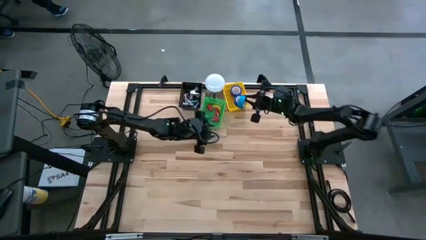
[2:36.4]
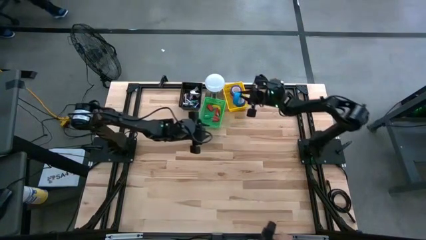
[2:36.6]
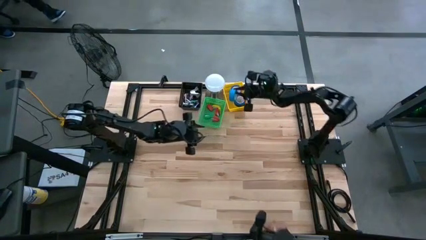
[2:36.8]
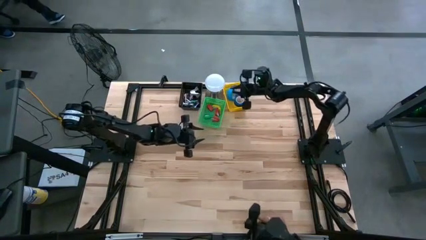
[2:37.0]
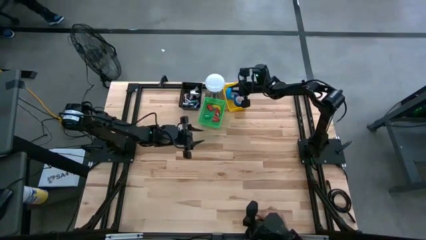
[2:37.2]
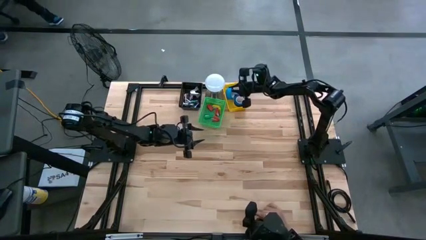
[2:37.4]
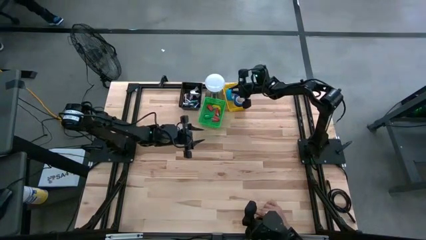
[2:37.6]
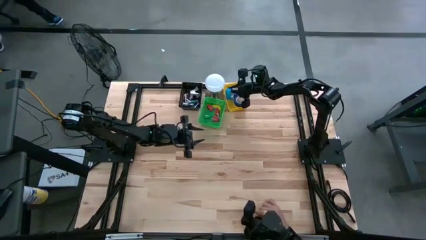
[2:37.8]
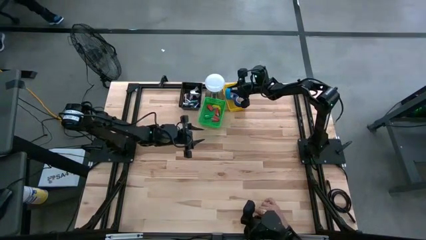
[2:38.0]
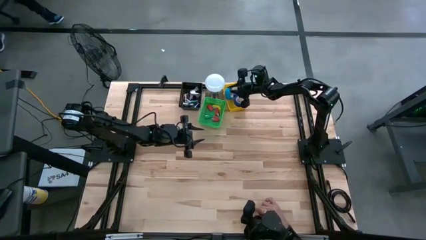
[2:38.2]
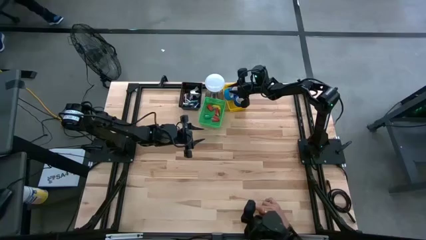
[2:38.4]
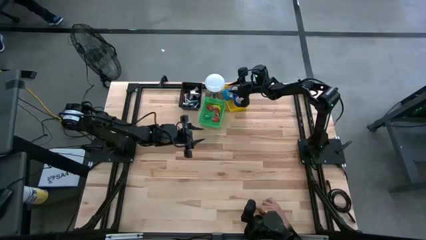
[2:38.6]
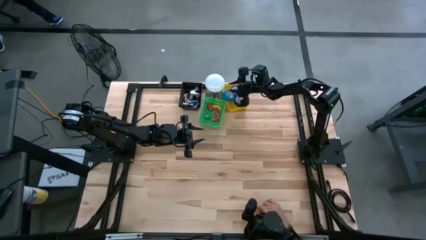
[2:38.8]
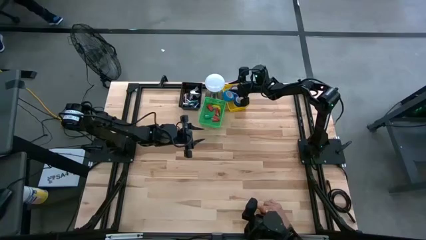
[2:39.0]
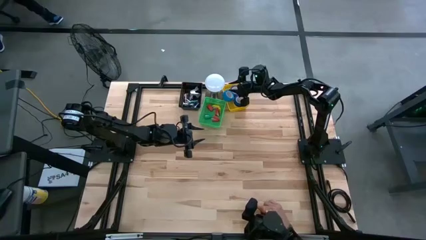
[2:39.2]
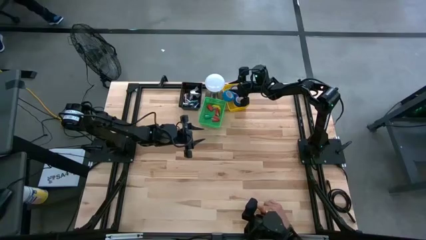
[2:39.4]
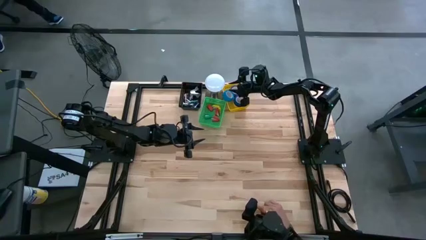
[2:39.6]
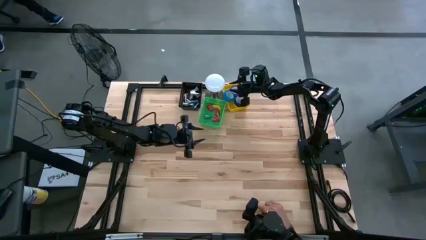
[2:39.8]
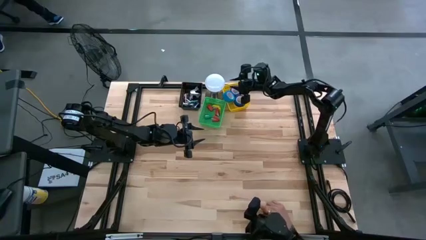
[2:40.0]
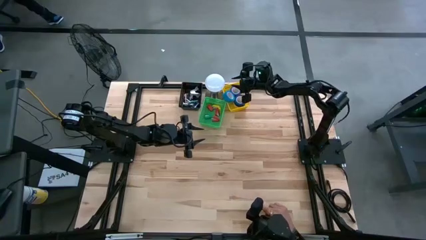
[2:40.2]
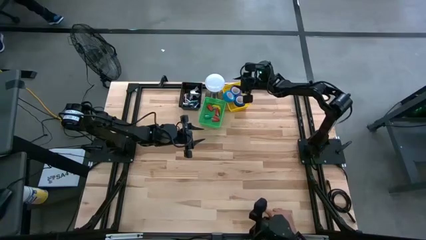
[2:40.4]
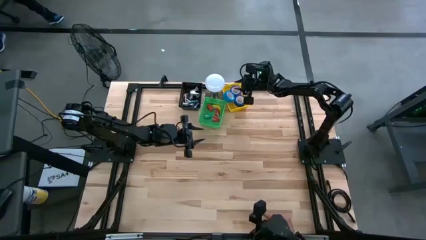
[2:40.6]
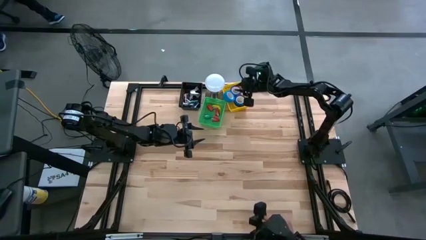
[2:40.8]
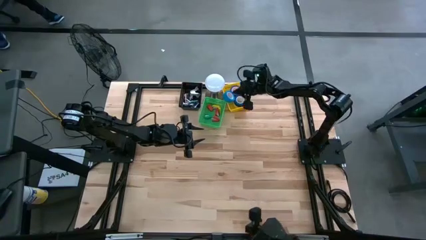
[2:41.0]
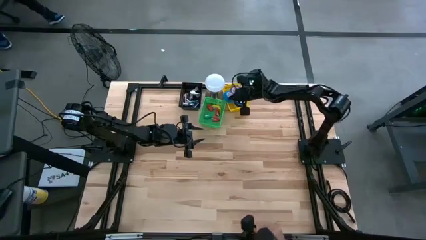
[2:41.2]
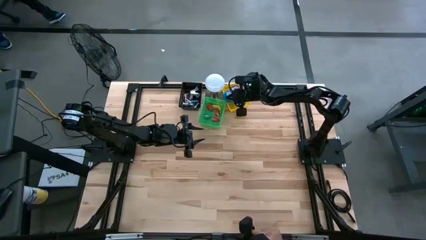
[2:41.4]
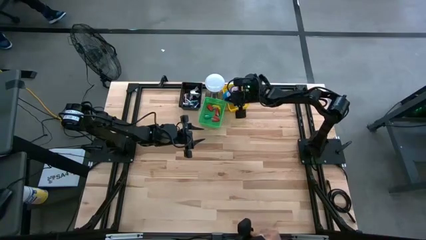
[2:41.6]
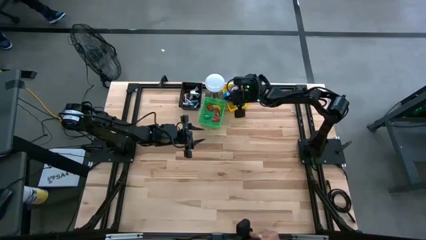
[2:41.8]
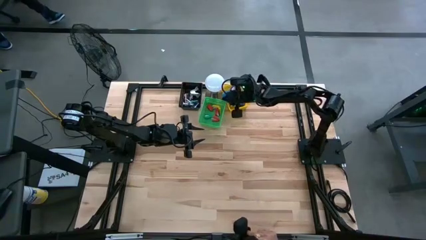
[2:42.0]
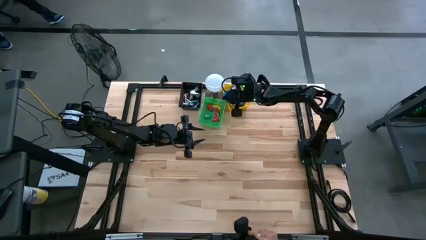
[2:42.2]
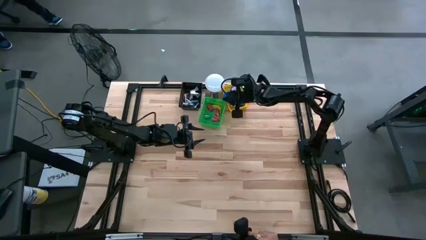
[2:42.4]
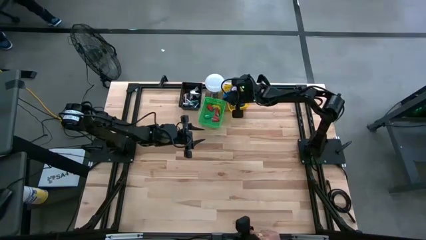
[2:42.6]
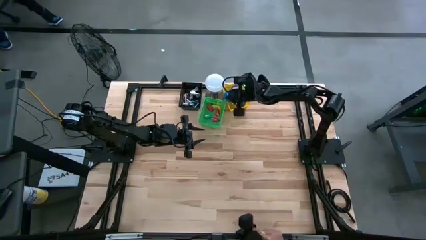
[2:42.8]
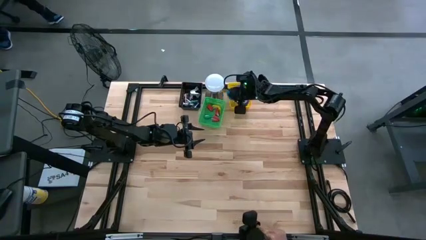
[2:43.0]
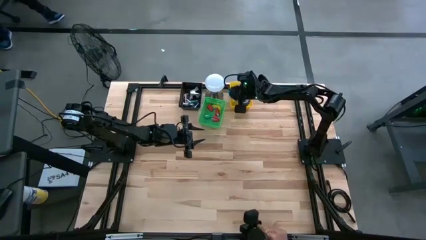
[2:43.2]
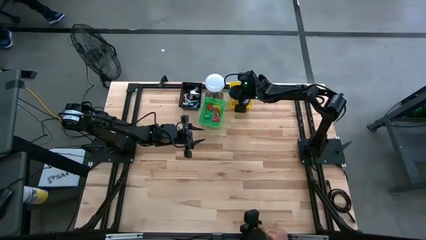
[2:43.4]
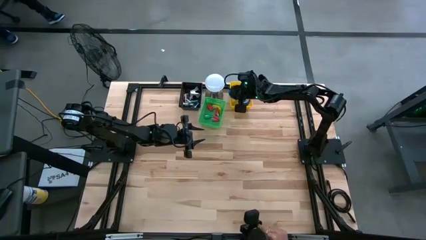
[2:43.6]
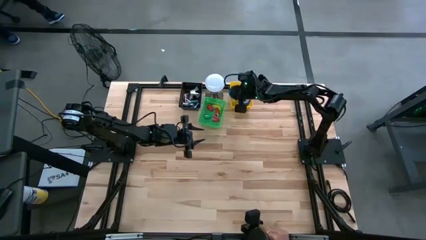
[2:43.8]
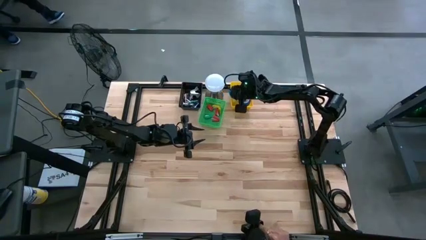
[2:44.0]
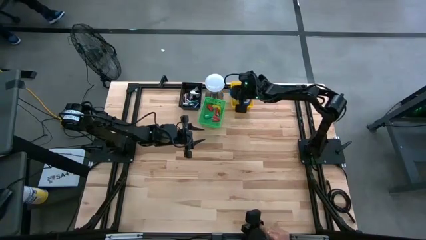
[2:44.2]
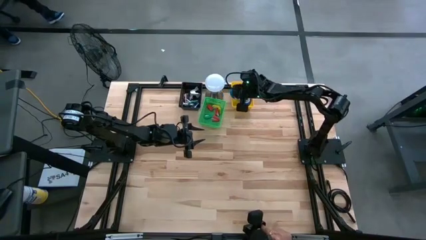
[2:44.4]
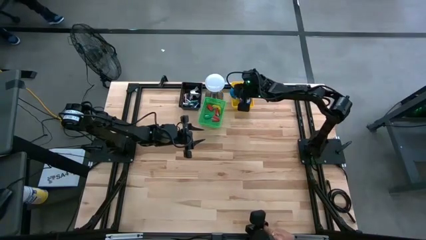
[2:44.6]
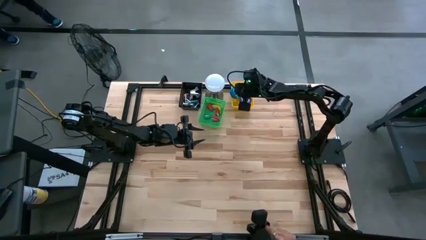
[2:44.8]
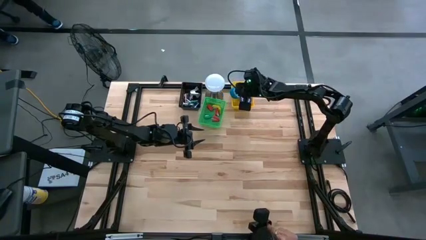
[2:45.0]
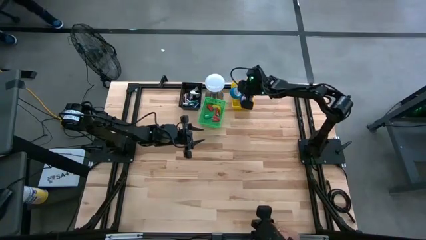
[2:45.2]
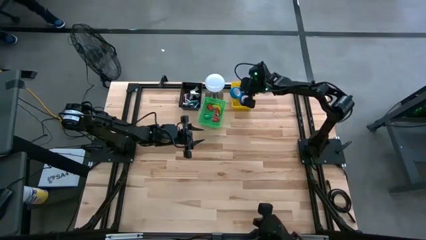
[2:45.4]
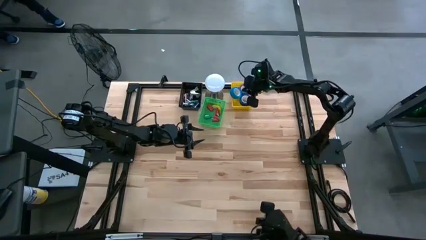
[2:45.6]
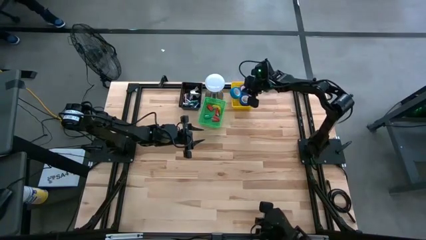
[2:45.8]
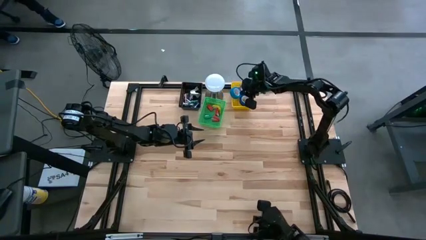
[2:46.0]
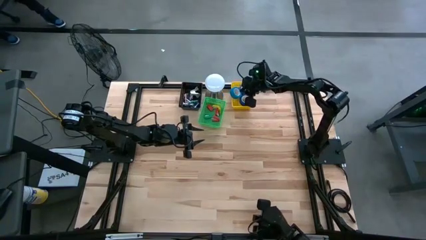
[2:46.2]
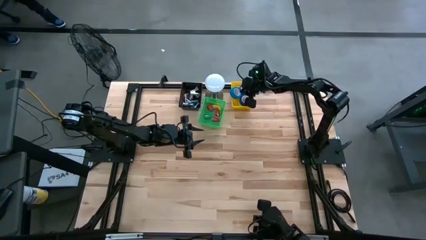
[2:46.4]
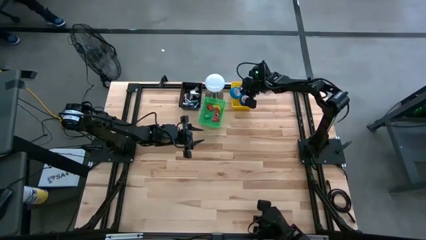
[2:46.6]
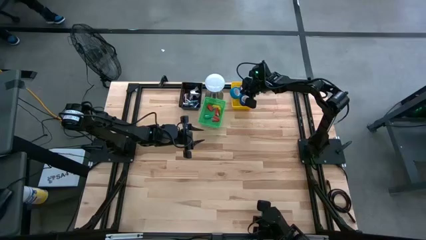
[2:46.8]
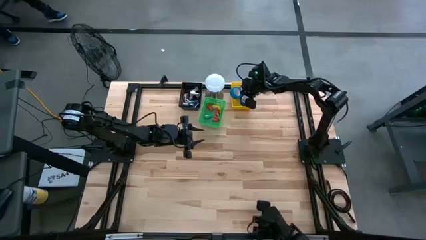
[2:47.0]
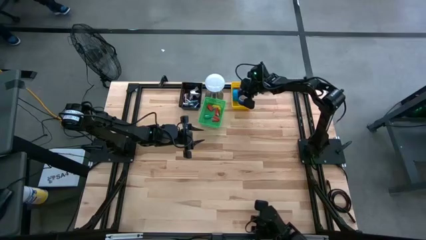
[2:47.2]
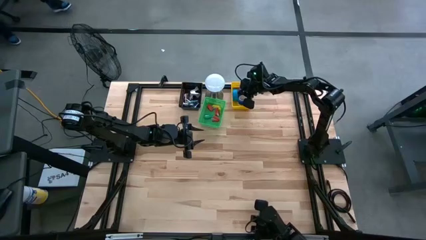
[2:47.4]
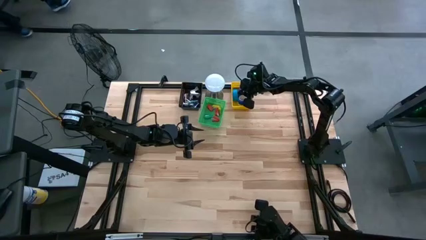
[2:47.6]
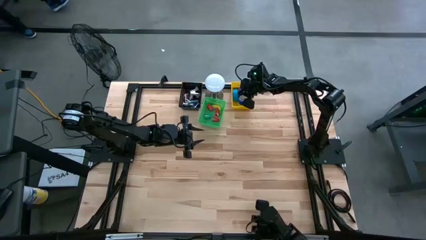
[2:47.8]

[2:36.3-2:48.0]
Task: Pick and place Stapler, Stapler remover, tape
Put the light blue tape into the yellow bin

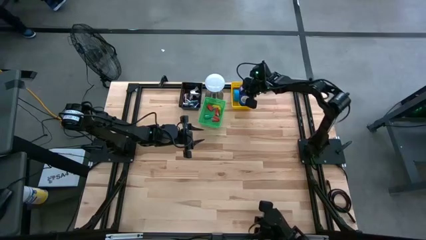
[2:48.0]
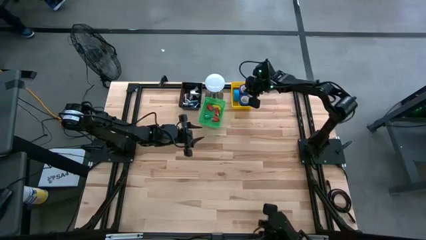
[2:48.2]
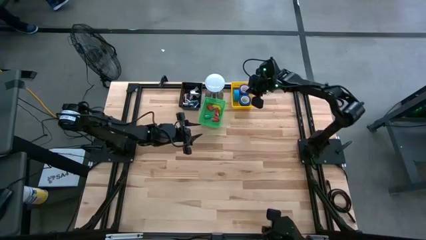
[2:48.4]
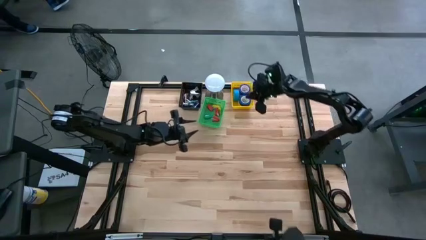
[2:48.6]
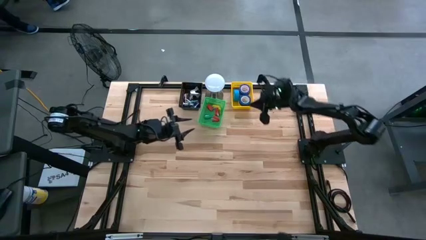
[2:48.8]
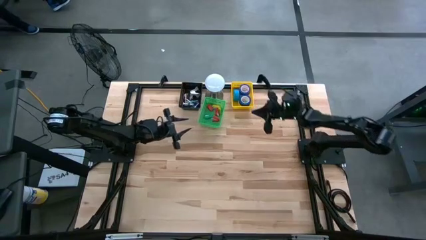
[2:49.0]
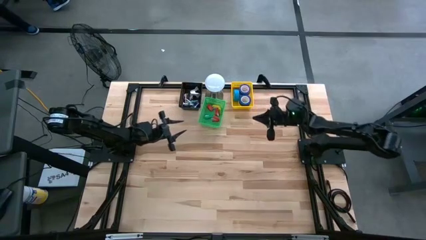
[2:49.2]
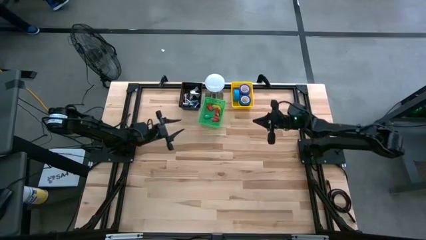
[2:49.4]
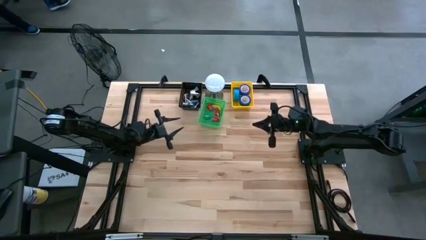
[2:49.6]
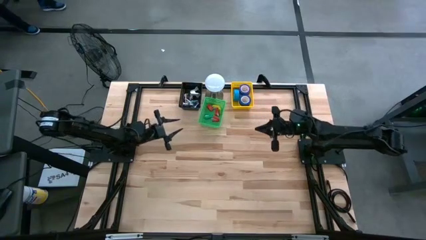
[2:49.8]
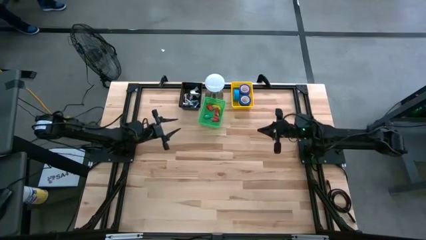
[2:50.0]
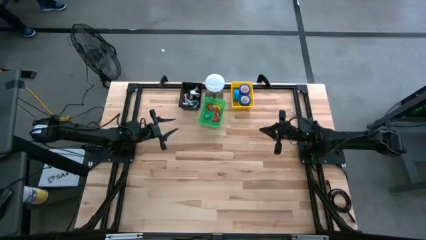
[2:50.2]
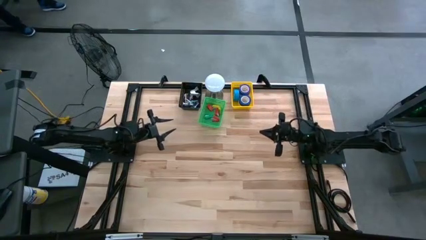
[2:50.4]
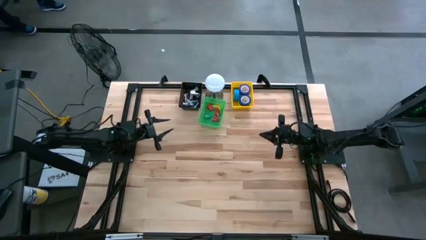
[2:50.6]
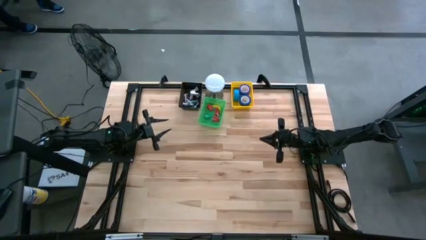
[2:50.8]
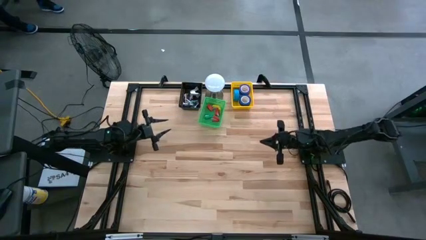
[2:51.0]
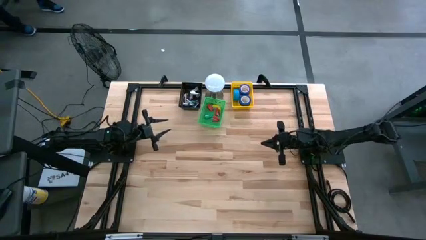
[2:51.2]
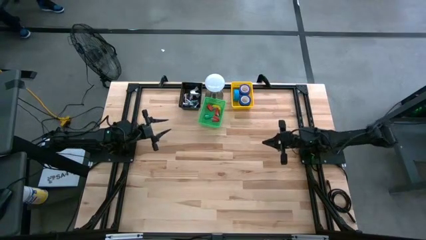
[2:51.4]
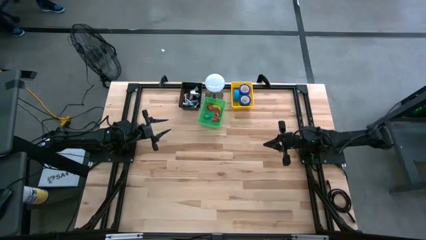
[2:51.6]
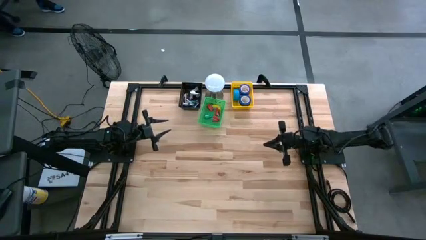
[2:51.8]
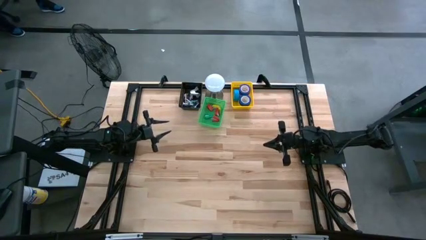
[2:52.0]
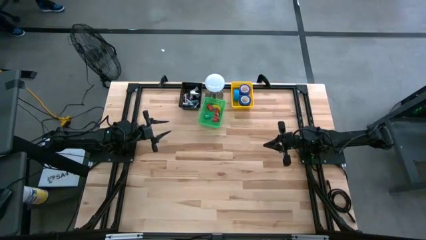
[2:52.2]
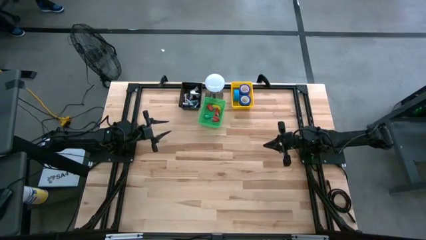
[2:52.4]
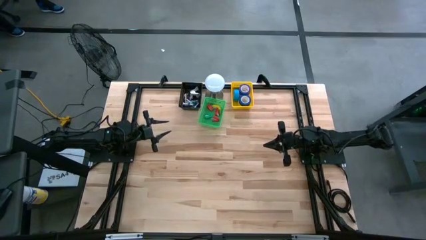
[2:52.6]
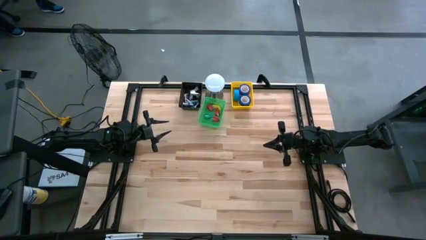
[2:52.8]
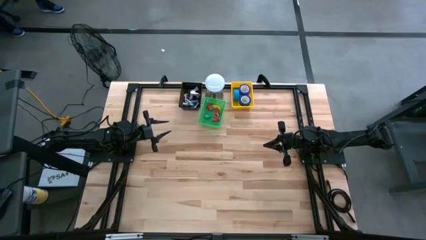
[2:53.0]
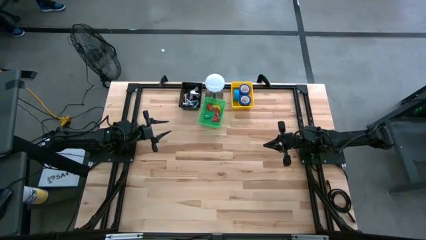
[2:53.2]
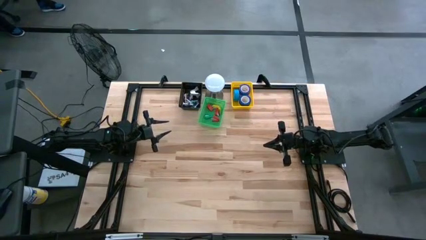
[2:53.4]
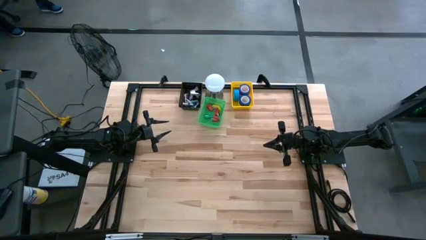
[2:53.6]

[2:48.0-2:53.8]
Return to Home Position
